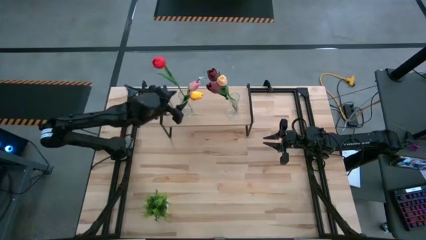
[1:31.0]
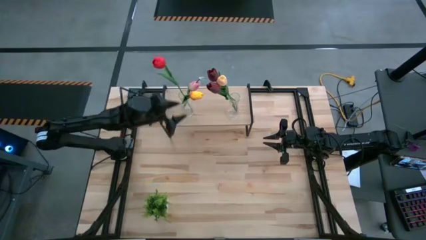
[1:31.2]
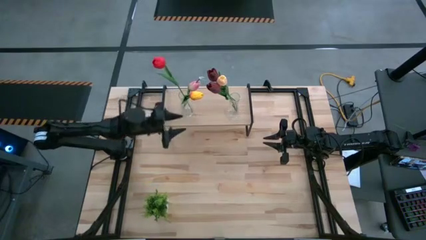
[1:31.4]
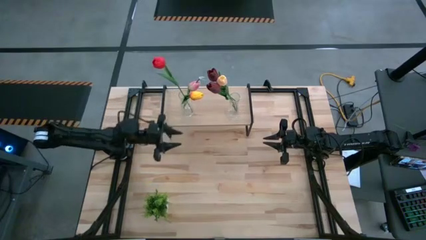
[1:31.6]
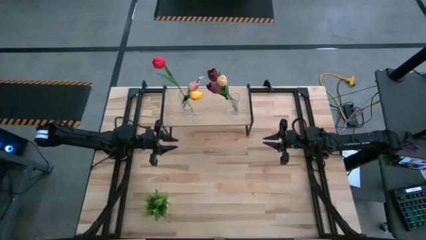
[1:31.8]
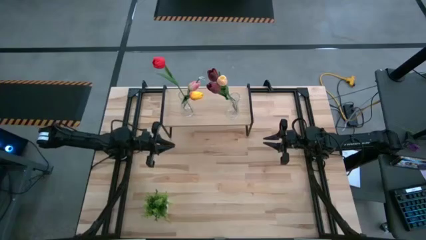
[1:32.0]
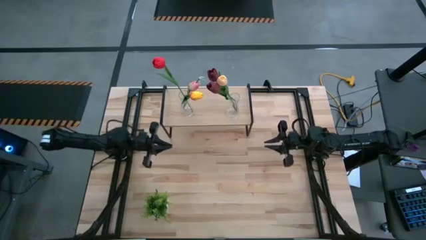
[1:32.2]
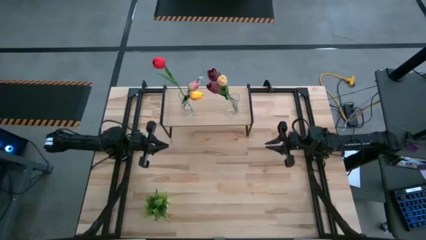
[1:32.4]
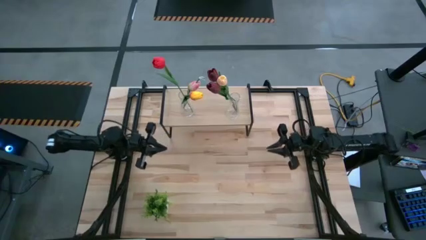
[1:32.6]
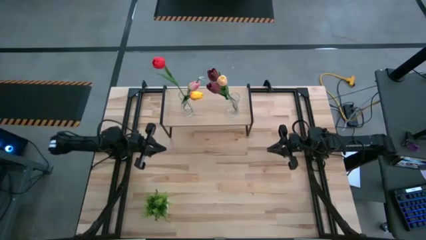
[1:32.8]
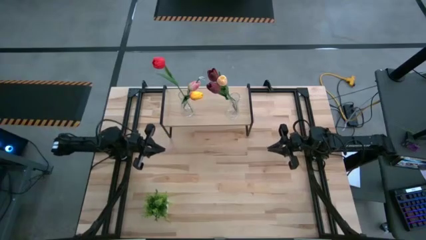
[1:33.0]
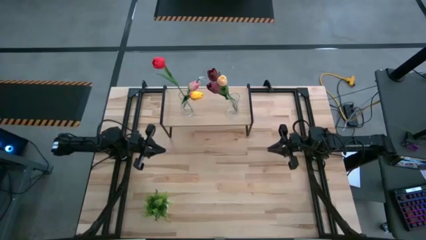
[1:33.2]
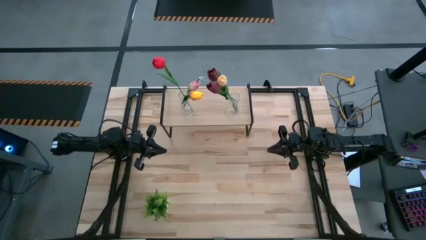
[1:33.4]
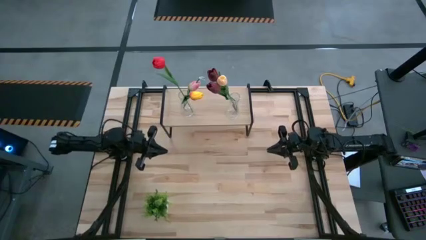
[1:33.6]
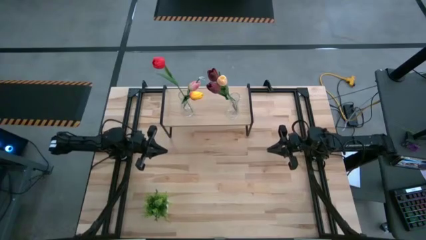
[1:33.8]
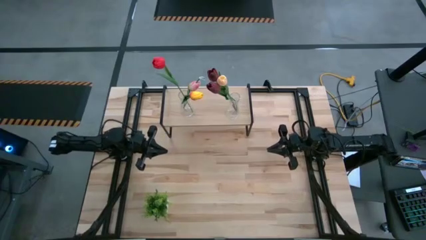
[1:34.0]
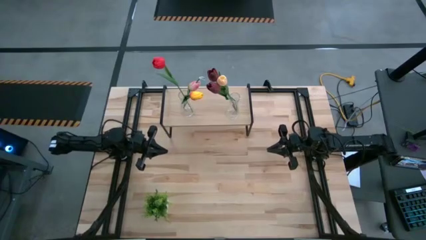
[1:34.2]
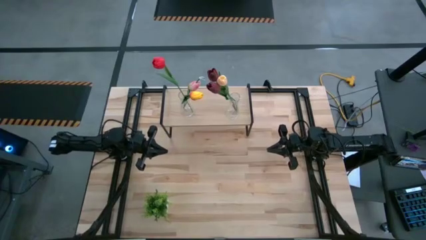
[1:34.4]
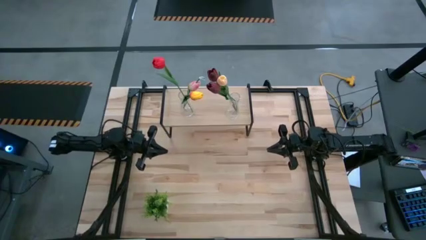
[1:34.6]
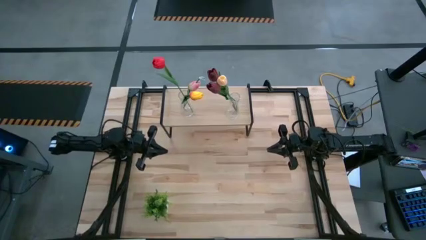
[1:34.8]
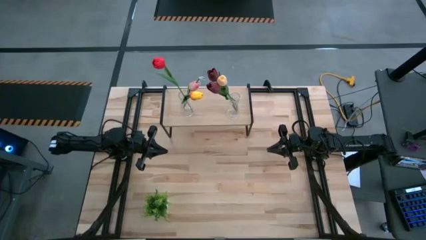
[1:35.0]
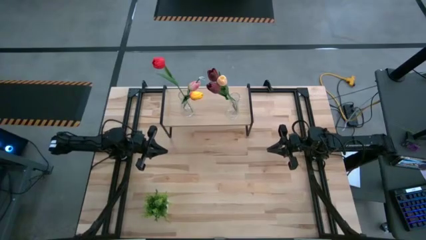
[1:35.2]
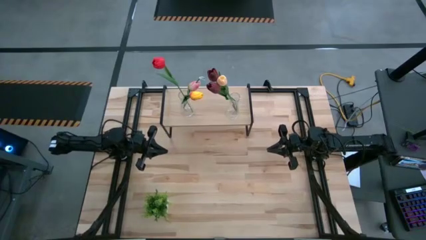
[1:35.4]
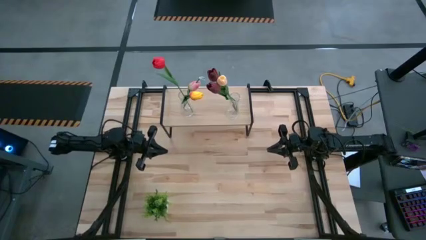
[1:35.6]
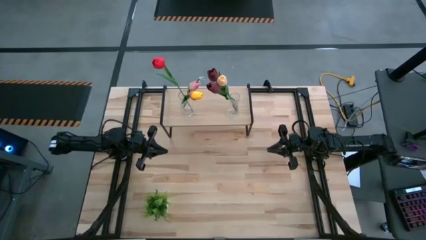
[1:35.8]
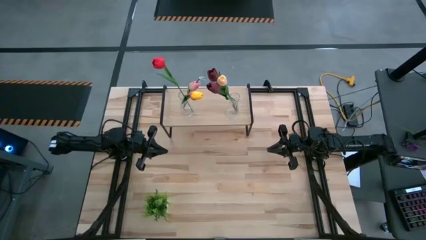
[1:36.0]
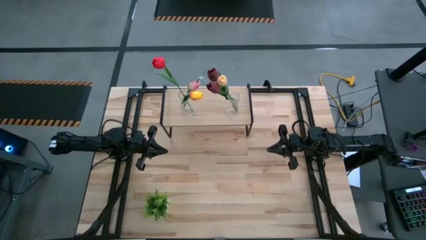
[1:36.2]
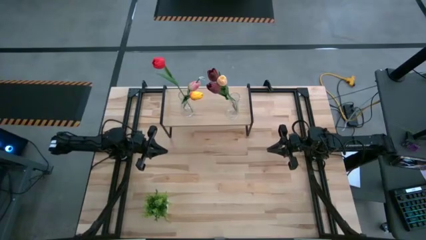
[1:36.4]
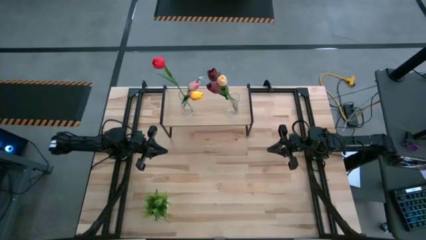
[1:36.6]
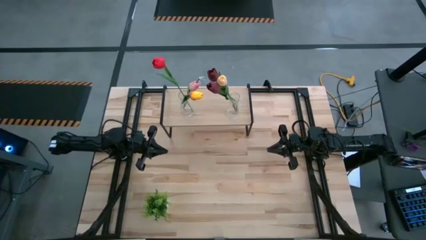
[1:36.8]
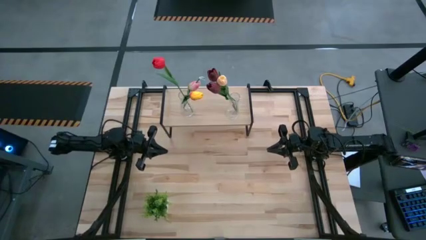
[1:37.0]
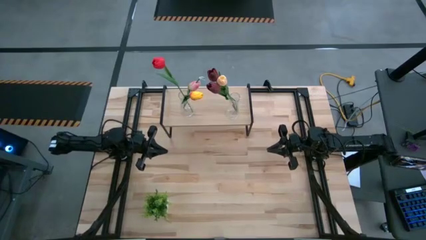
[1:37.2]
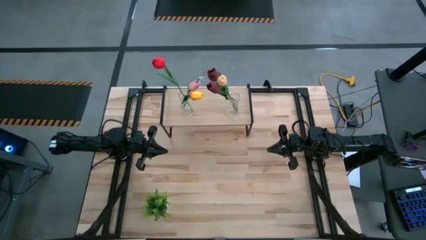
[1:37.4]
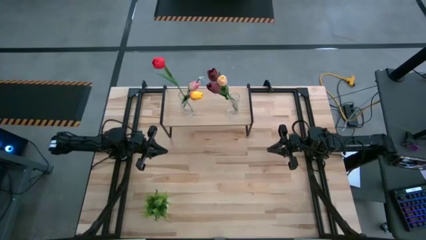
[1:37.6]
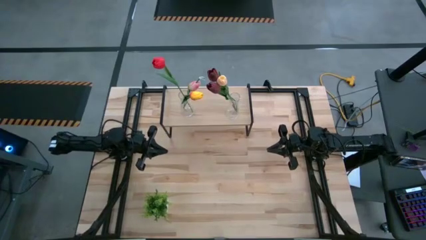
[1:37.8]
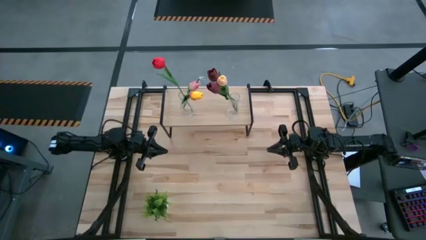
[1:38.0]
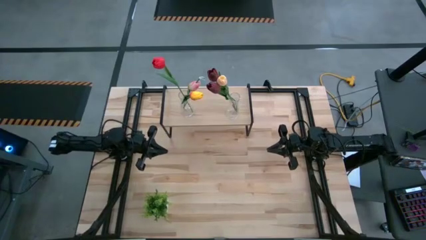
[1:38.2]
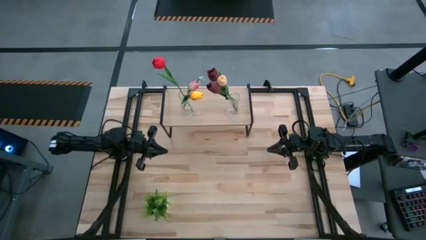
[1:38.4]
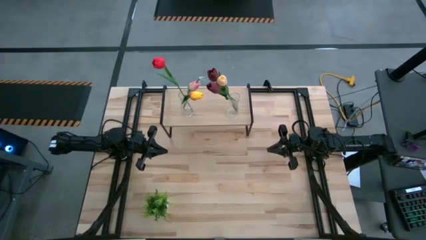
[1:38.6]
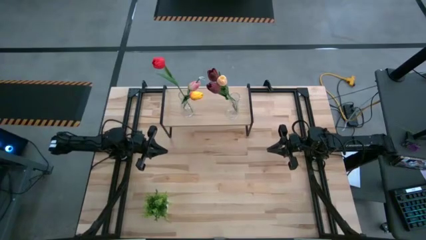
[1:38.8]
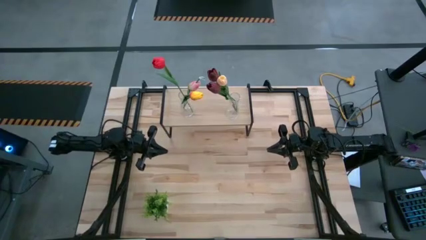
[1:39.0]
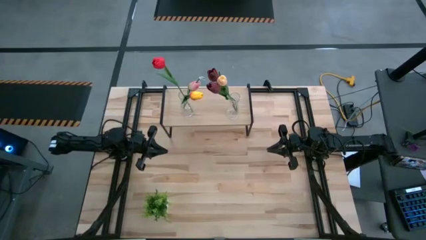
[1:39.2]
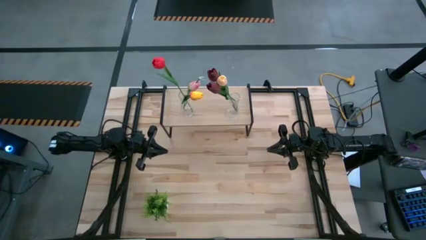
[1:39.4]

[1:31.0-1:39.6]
Task: Pick and place flowers into a vace then onto a shelf
Return to Home Position

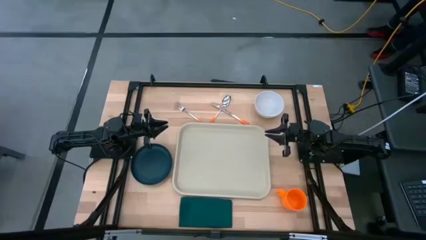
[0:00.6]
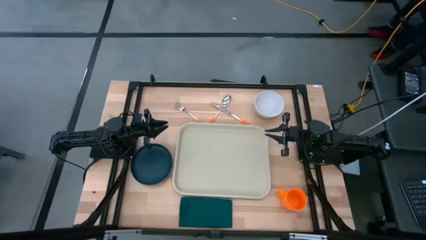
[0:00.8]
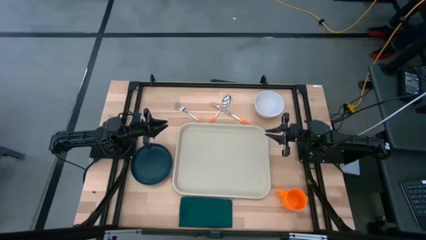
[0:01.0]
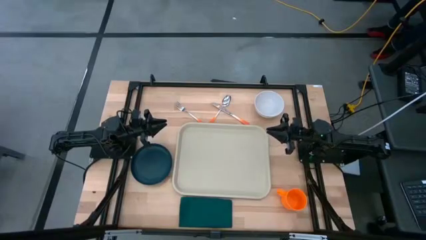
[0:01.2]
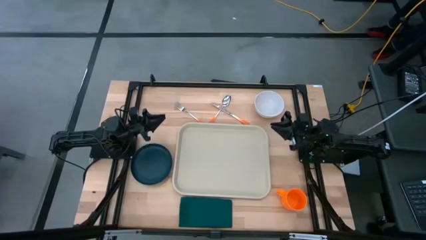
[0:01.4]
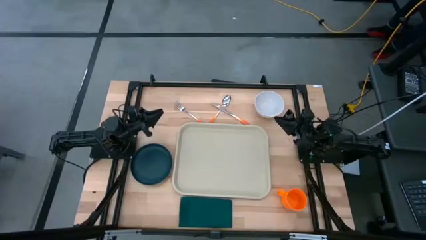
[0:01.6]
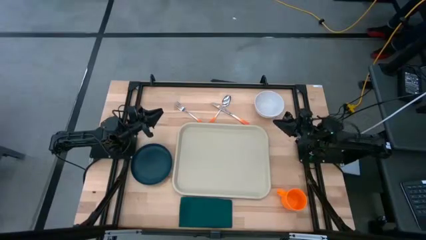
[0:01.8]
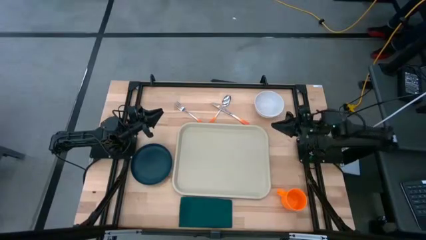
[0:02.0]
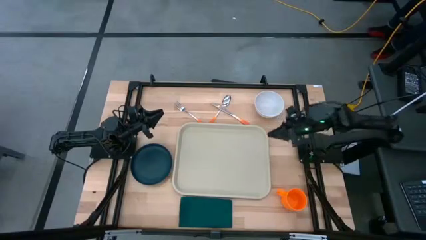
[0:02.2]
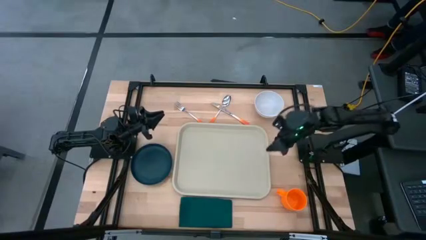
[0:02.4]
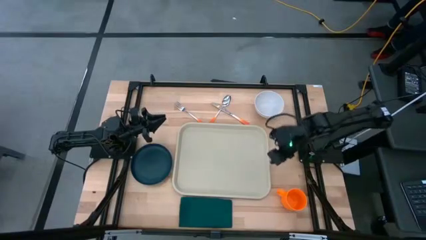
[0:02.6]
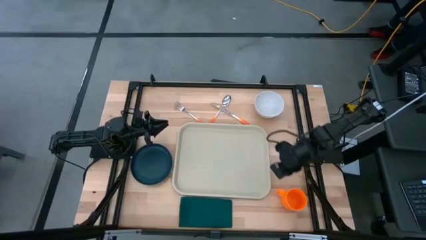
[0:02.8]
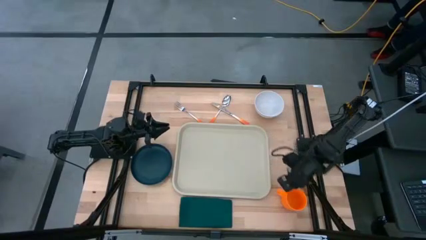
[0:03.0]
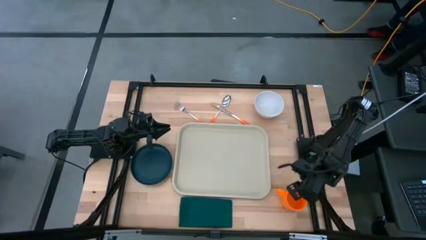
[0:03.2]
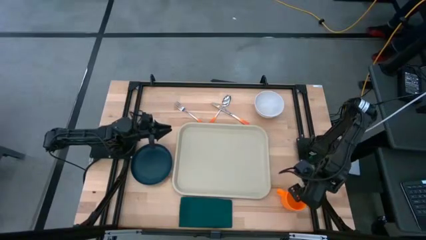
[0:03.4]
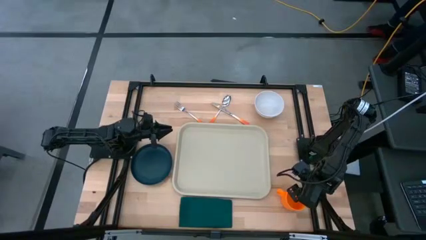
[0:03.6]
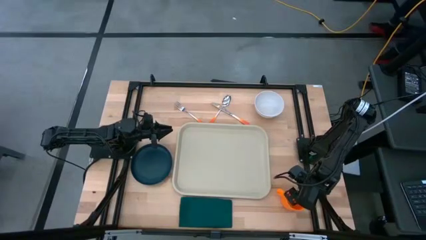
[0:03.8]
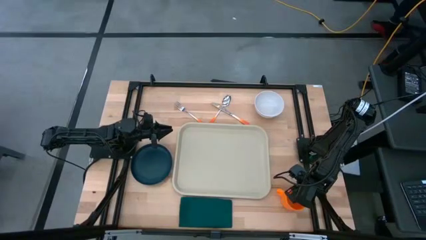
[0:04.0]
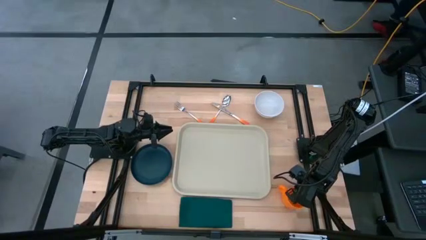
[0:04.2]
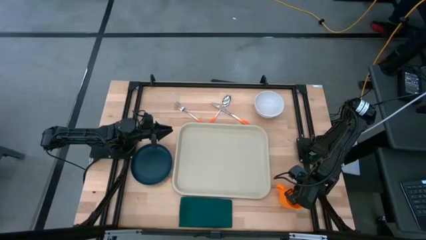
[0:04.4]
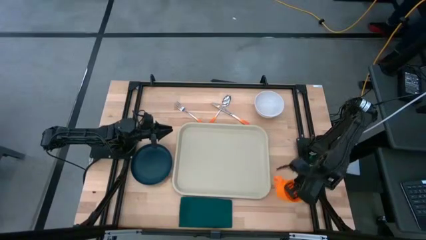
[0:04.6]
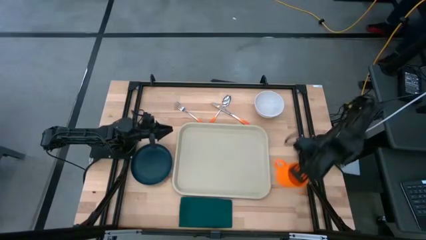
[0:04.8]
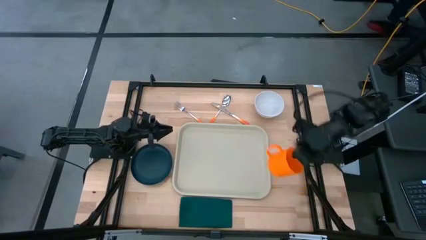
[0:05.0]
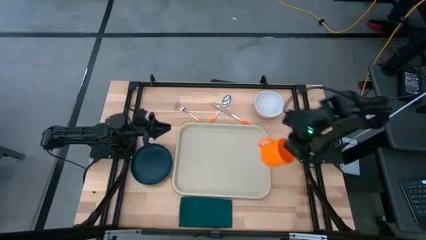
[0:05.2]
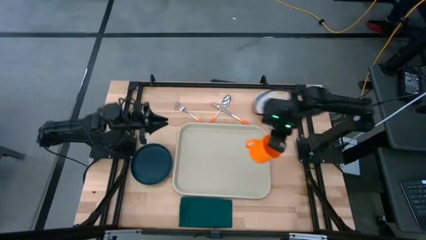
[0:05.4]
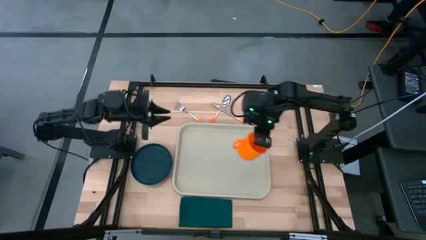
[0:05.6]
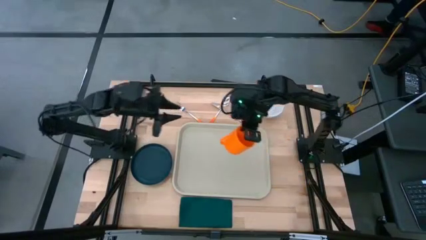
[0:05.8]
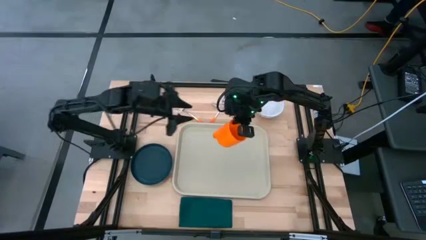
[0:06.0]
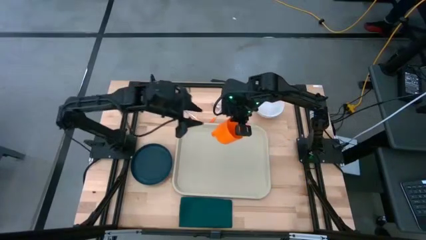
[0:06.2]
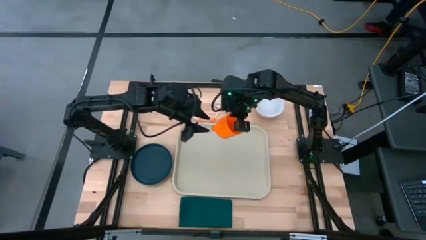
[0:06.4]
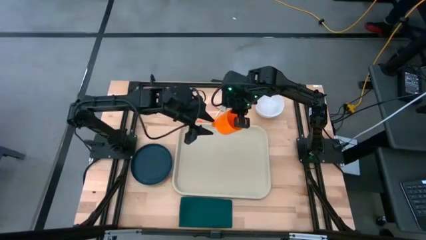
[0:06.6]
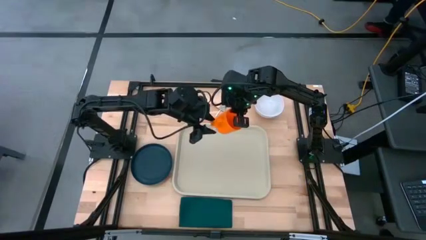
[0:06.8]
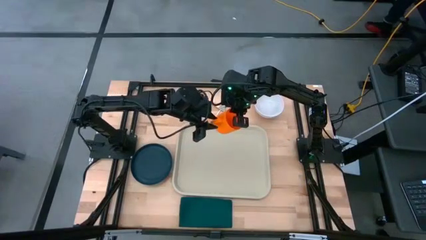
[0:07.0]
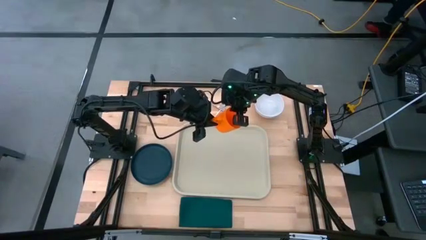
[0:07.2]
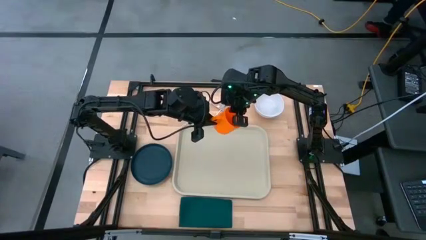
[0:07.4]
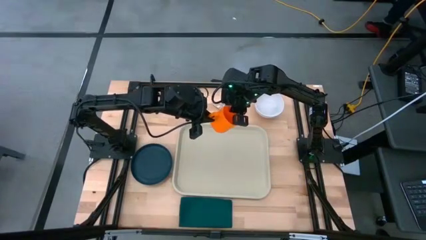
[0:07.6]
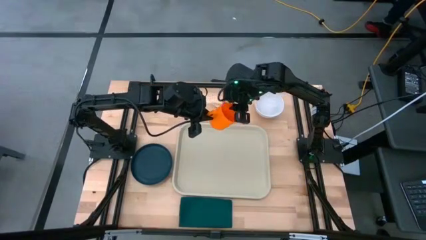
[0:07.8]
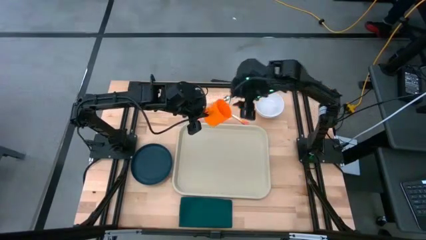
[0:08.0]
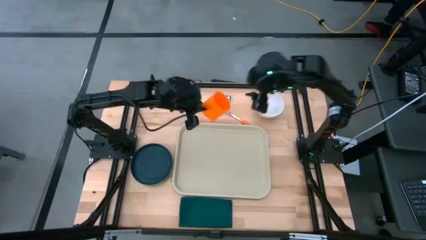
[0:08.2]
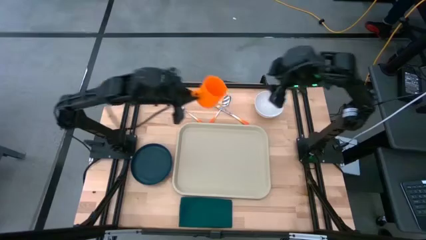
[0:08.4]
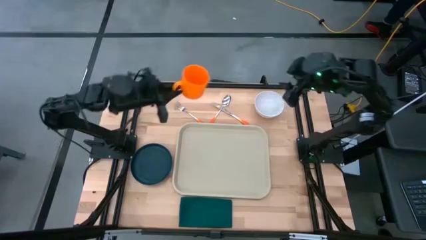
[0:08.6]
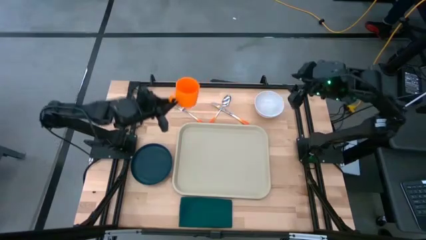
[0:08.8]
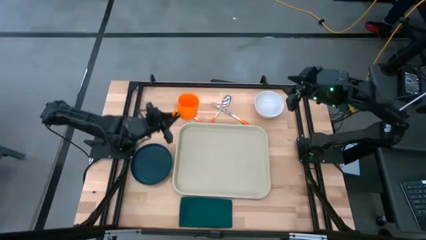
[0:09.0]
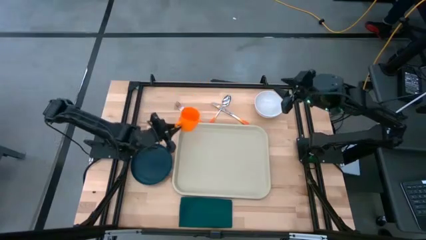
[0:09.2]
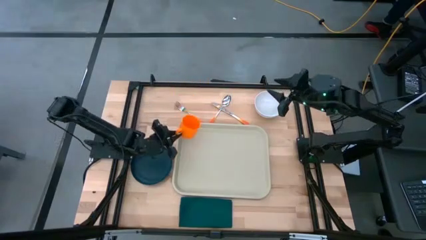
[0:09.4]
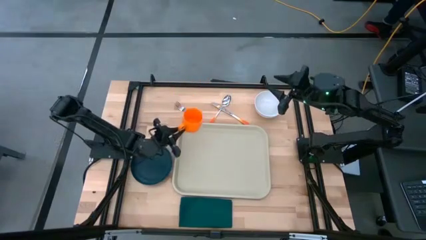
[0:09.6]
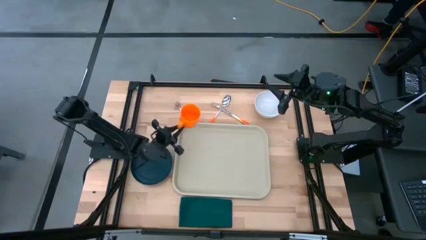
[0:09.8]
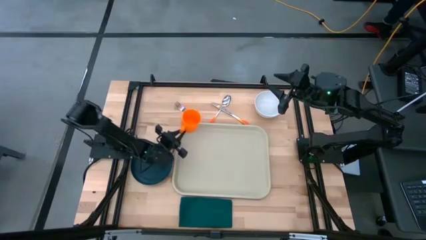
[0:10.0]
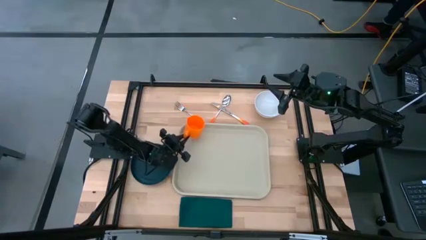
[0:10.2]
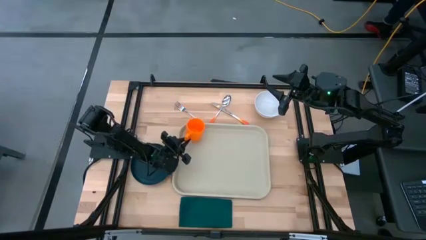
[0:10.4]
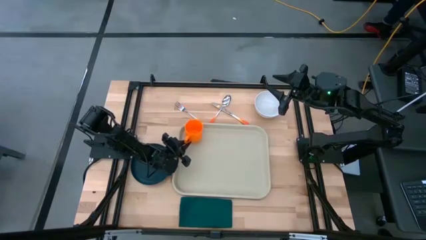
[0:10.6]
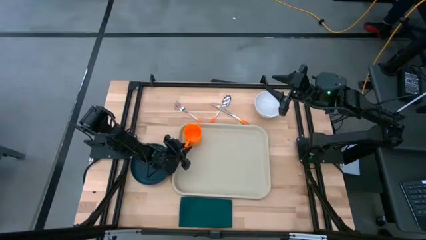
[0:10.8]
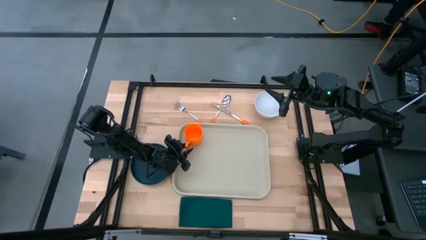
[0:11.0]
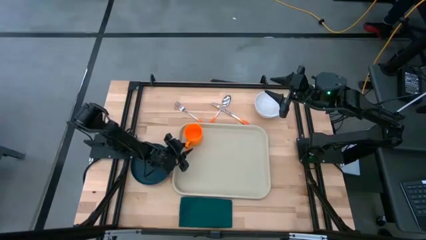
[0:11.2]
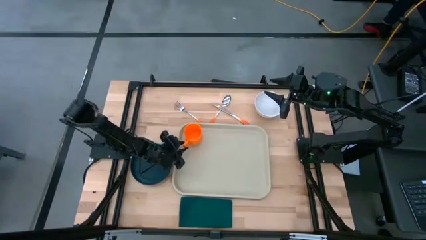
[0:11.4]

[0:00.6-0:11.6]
Task: Set up tray
Put the orange mug on the top left of the white tray
